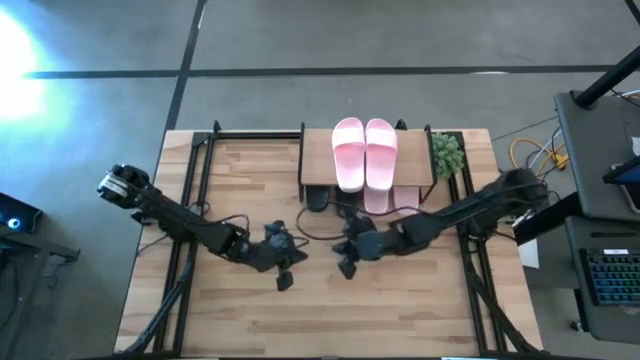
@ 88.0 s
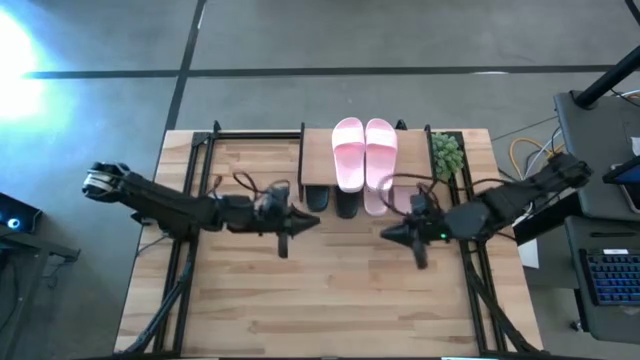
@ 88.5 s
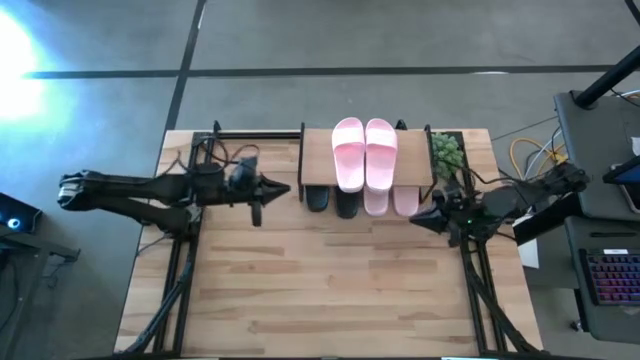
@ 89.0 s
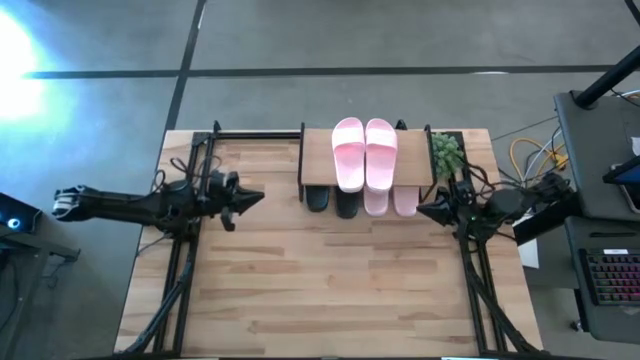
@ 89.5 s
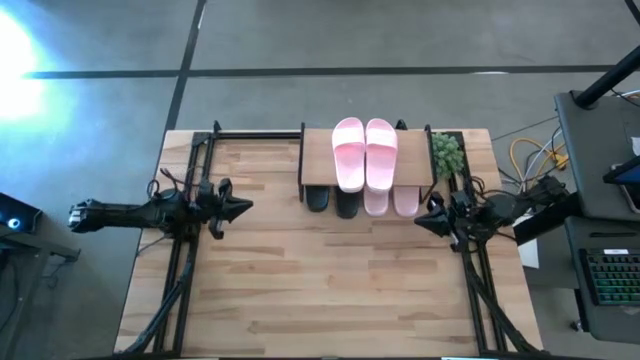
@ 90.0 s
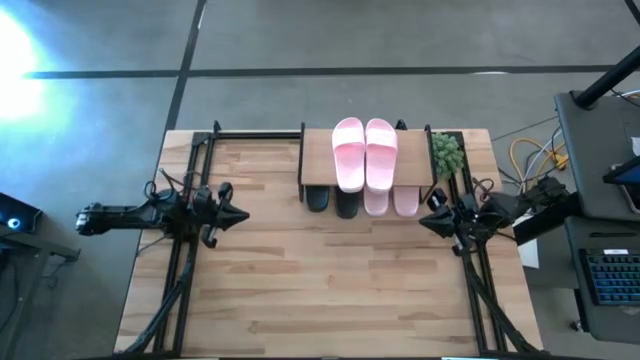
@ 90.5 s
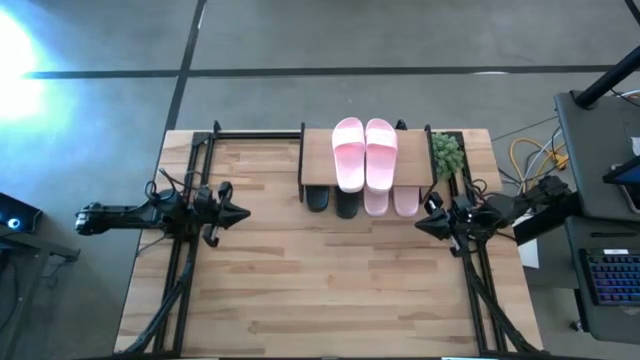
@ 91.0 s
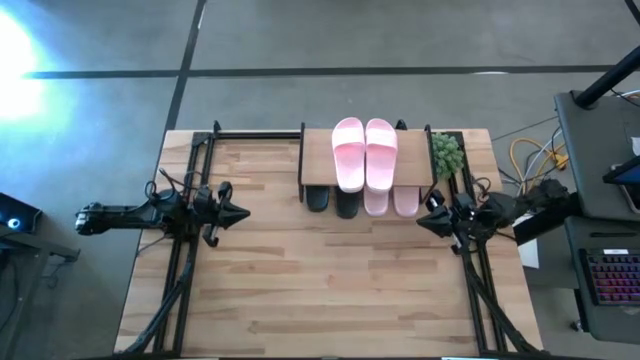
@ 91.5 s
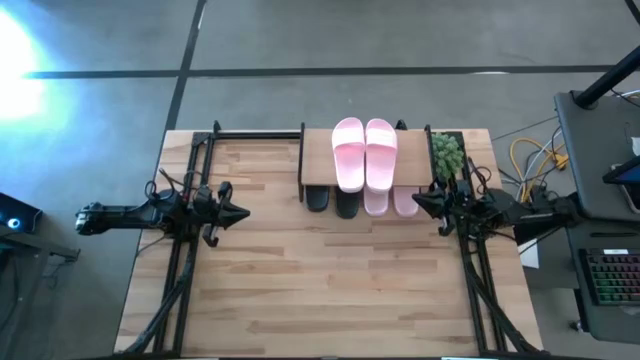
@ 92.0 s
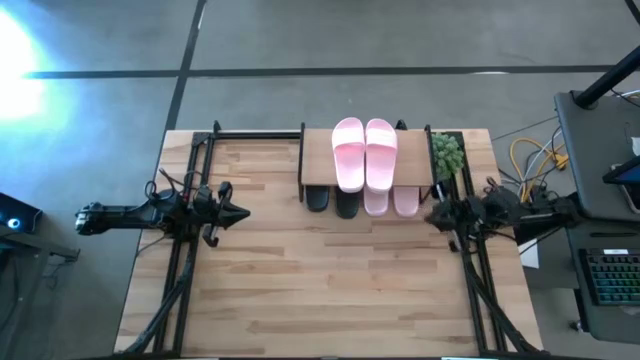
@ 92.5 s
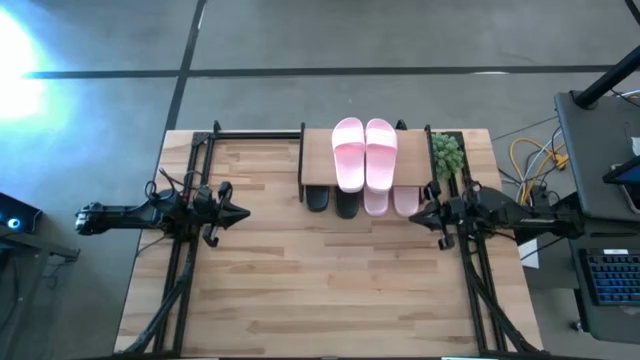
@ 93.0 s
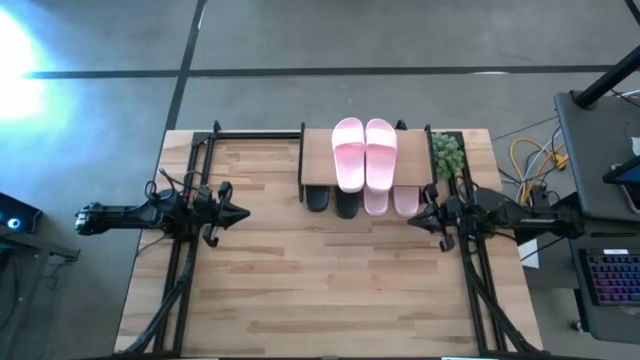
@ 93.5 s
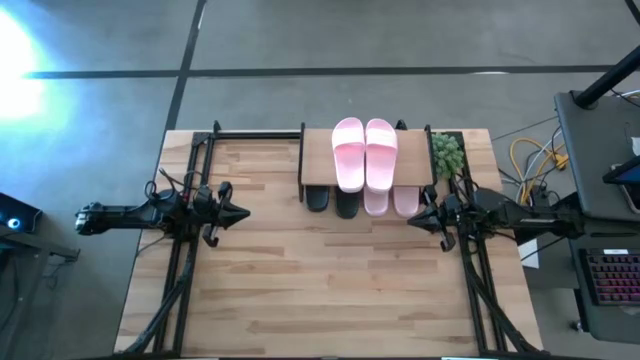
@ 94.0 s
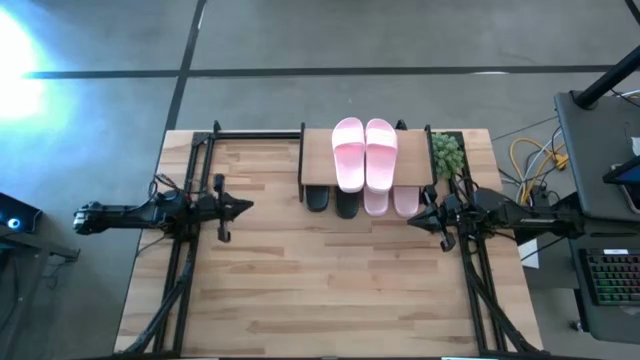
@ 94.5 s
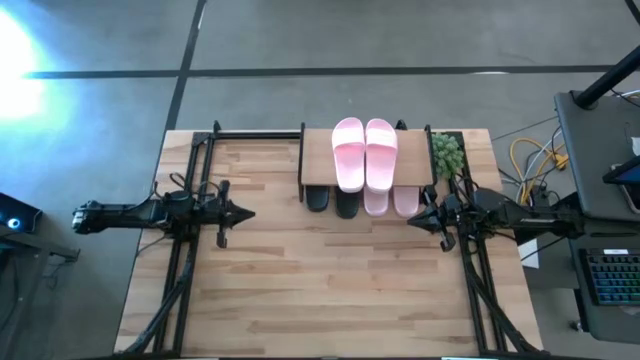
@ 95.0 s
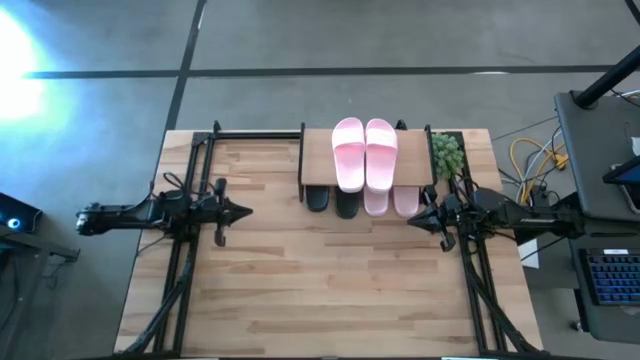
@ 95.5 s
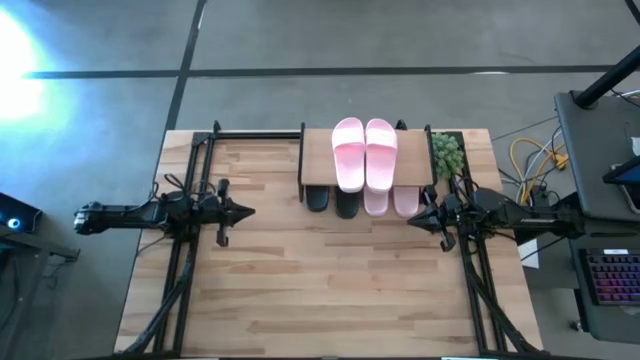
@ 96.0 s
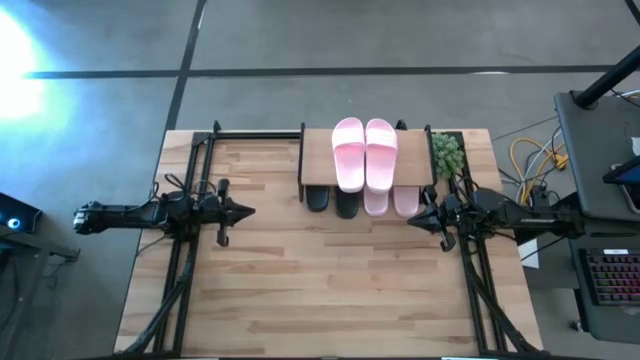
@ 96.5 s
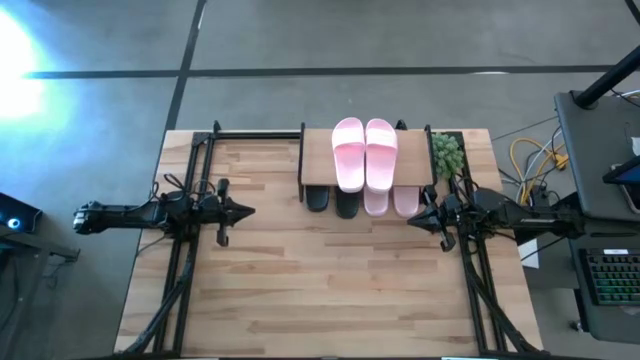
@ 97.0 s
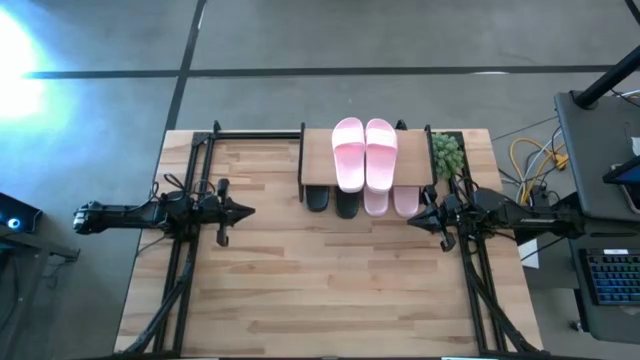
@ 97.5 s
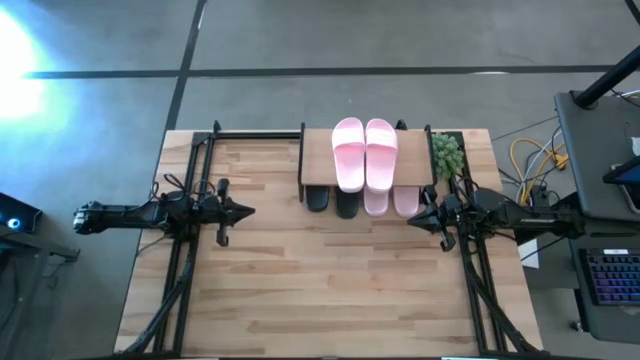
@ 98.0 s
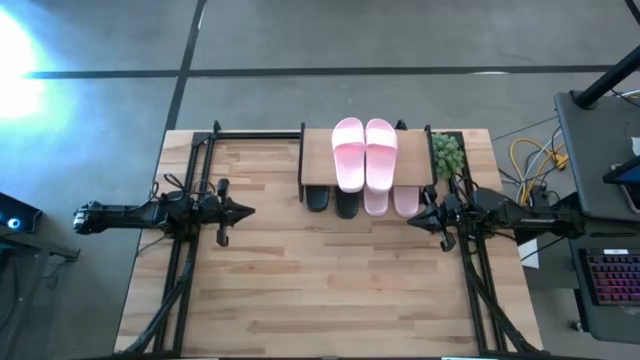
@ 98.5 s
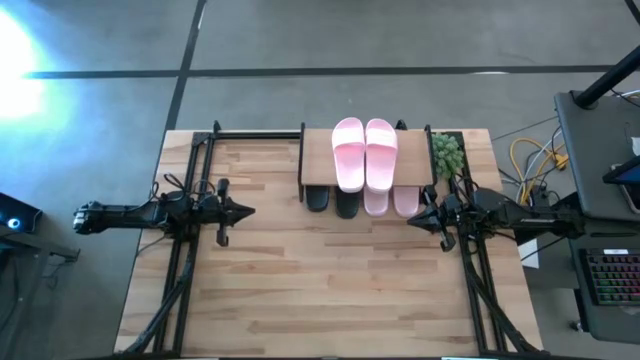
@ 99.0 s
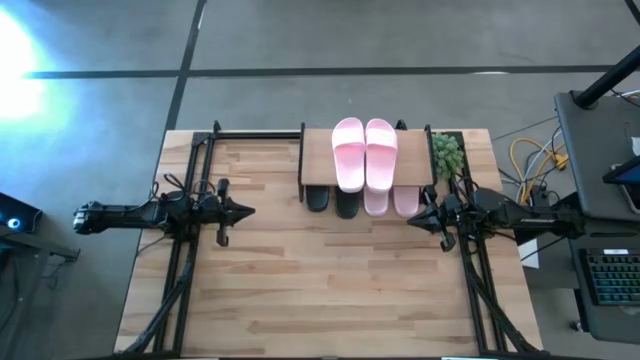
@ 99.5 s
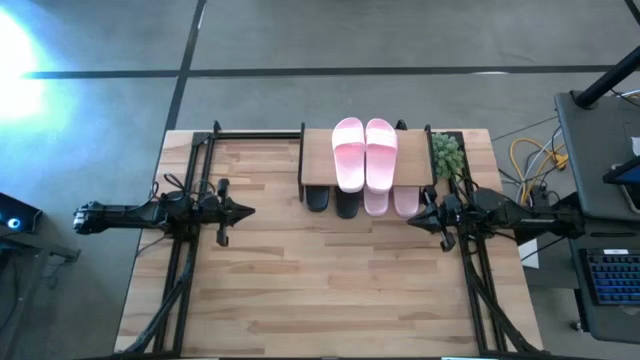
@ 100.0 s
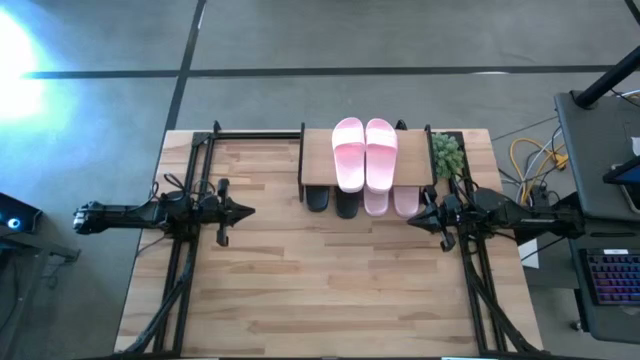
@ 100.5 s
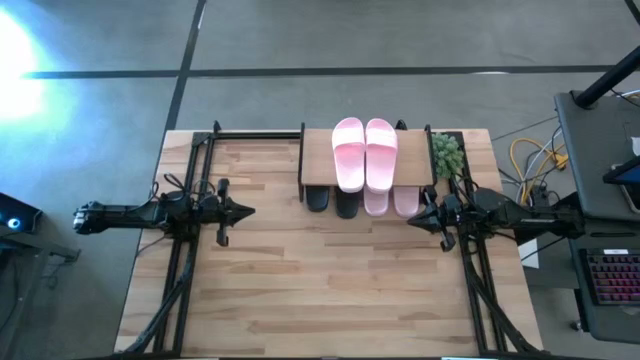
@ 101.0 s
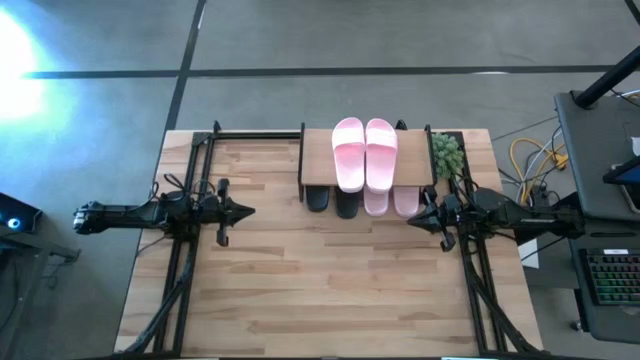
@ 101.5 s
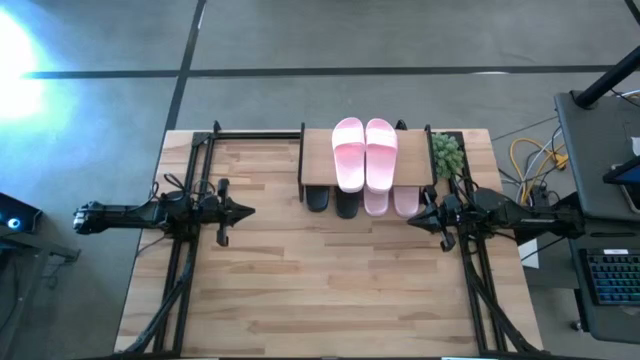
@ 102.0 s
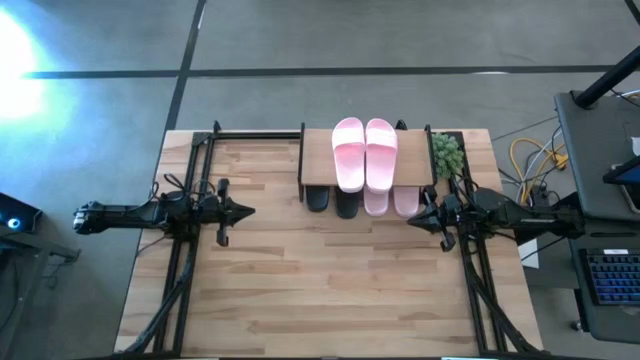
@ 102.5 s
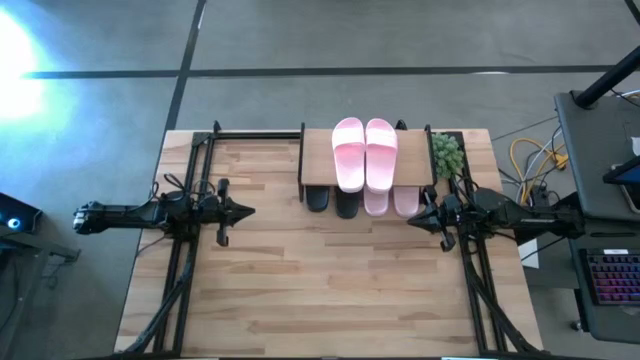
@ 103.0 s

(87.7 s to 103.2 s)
Task: Pick and place slides into the shelf
Return to Home Position

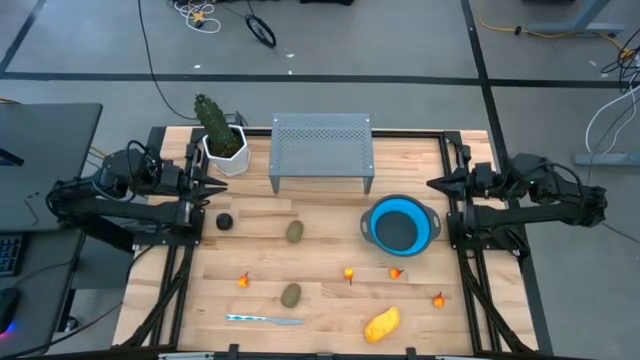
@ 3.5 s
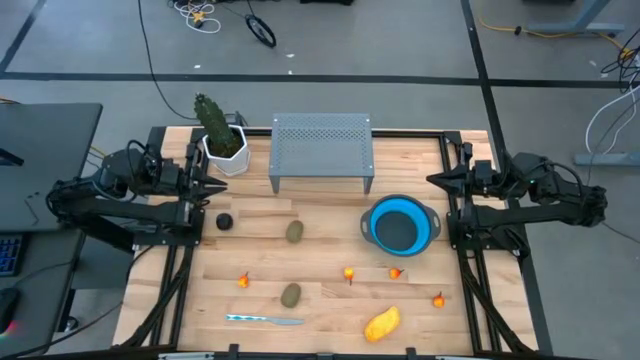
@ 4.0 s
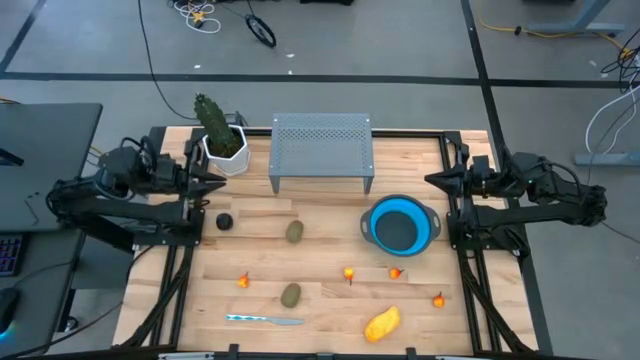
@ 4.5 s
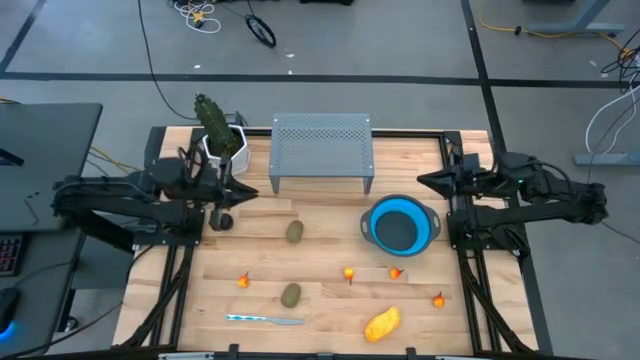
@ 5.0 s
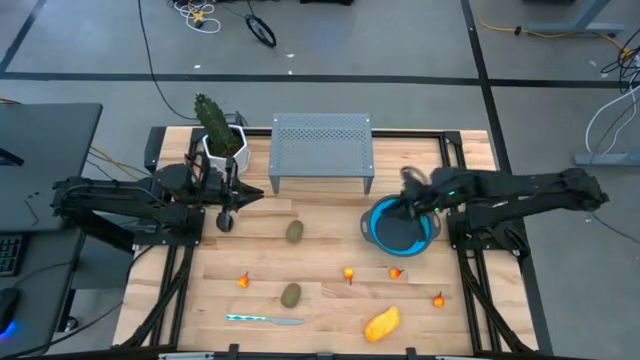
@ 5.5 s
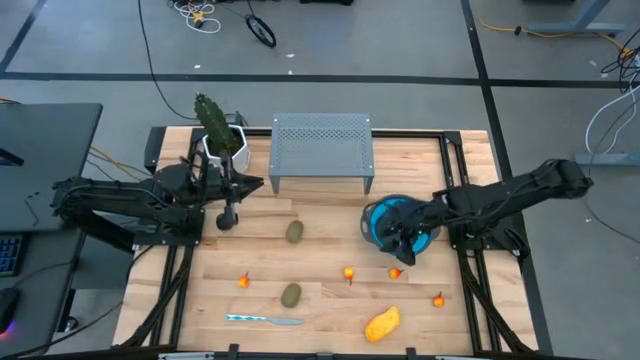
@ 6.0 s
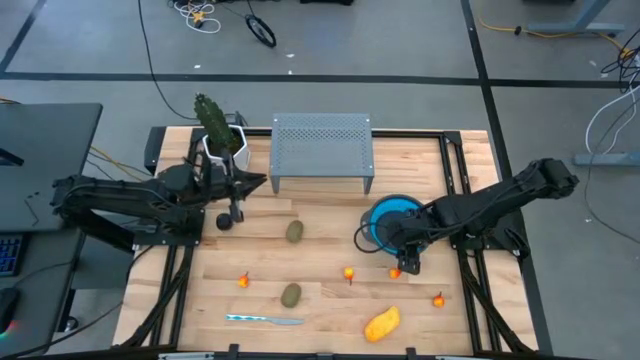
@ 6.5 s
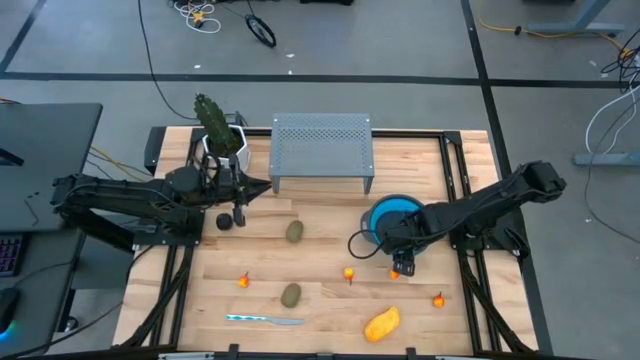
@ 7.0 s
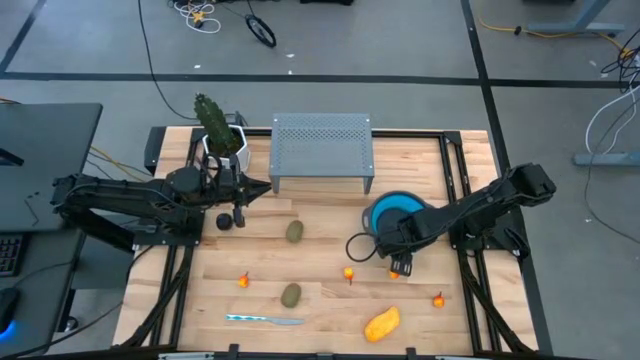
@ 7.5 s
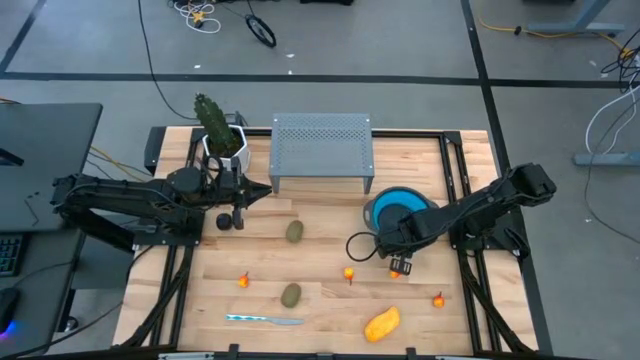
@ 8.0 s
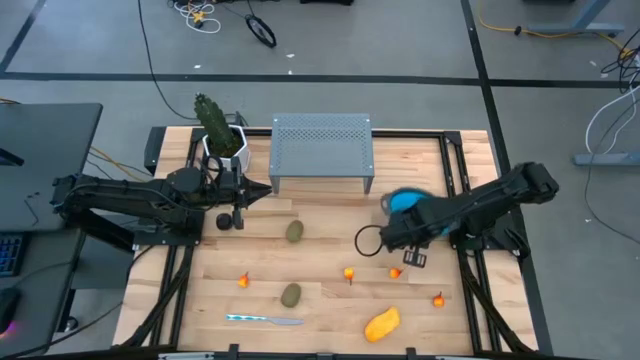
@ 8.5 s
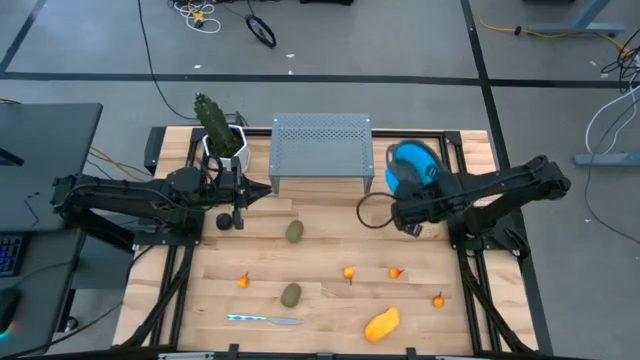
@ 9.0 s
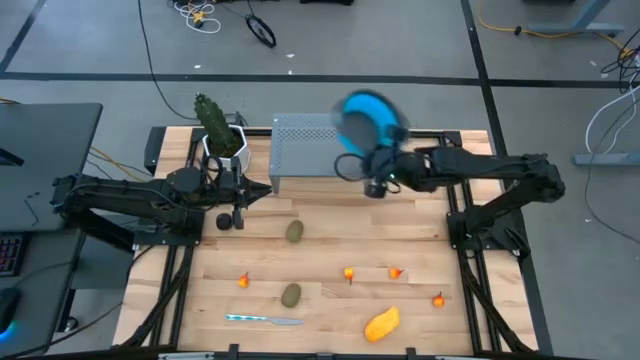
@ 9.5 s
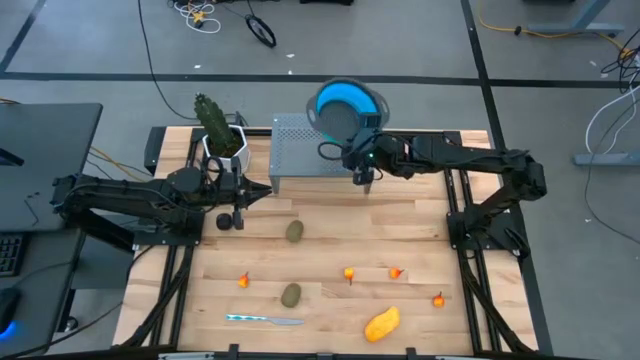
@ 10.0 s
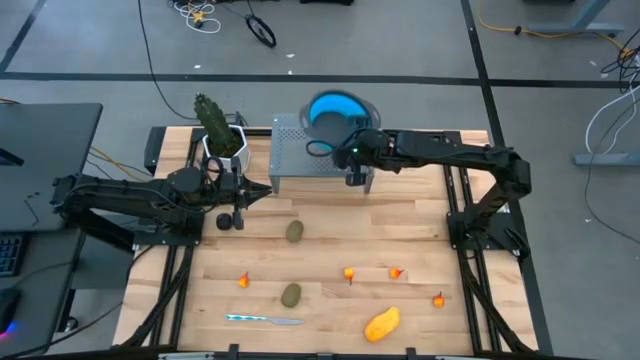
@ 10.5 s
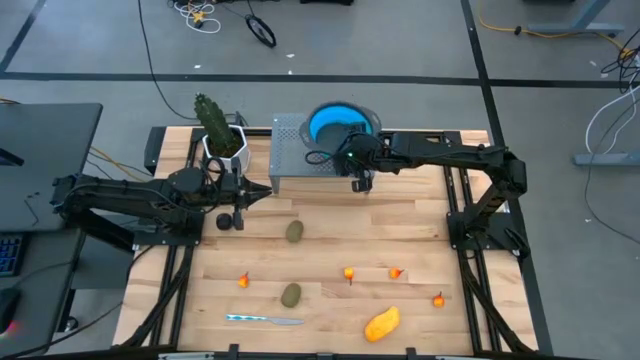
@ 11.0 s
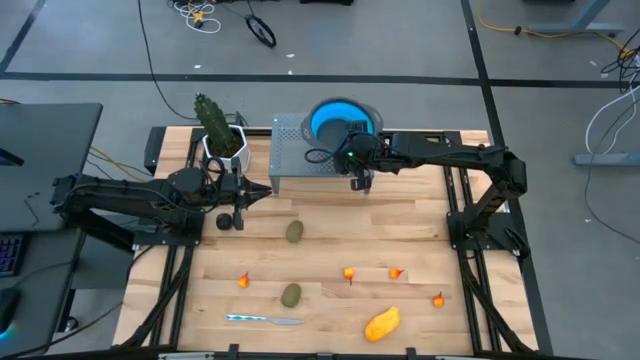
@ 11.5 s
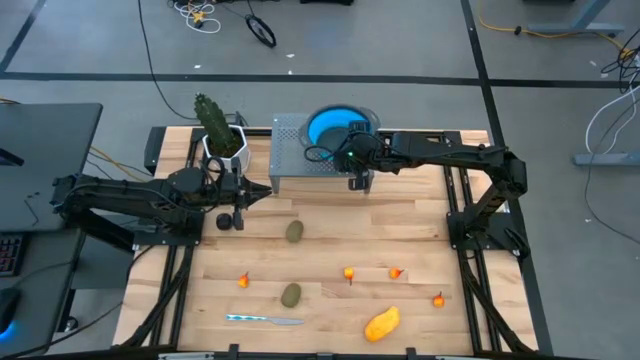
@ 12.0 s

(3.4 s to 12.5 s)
Task: Pick & Place Fruit
Put the blue strainer bowl on the shelf
